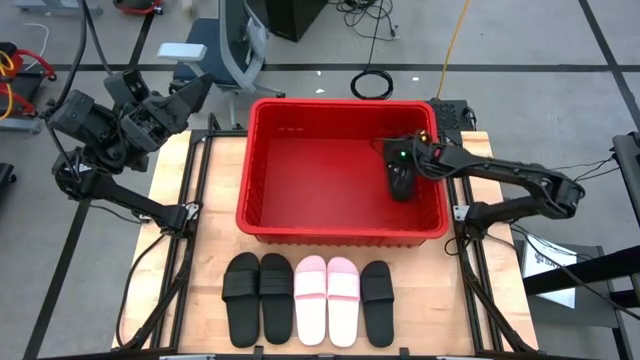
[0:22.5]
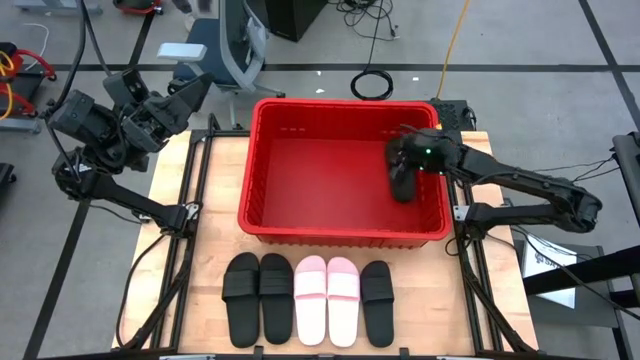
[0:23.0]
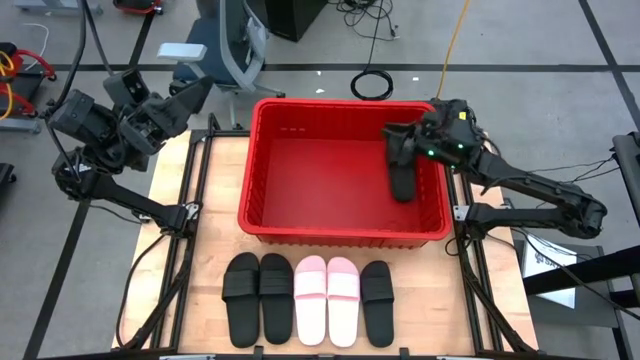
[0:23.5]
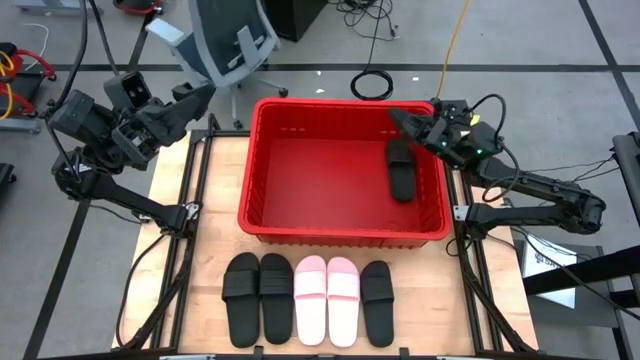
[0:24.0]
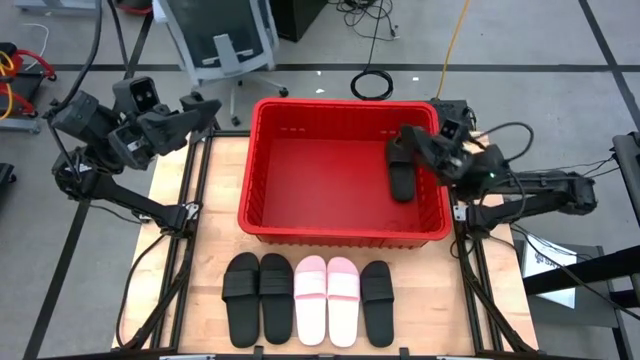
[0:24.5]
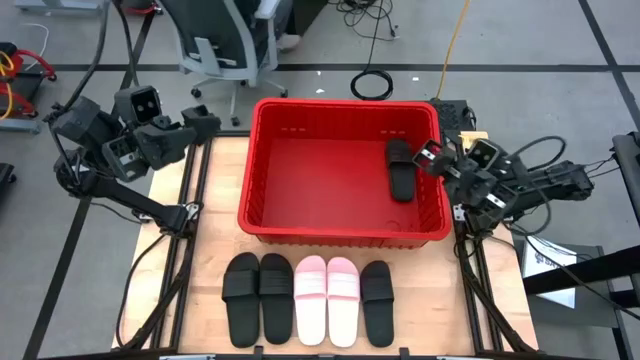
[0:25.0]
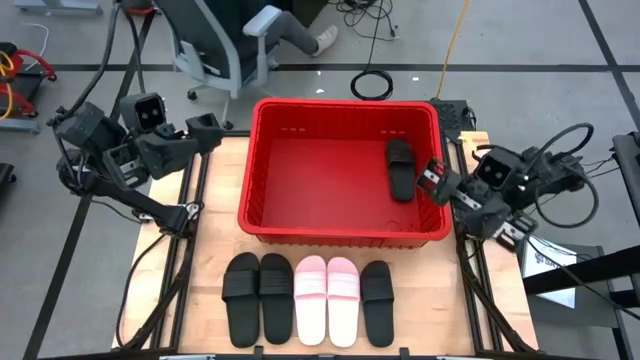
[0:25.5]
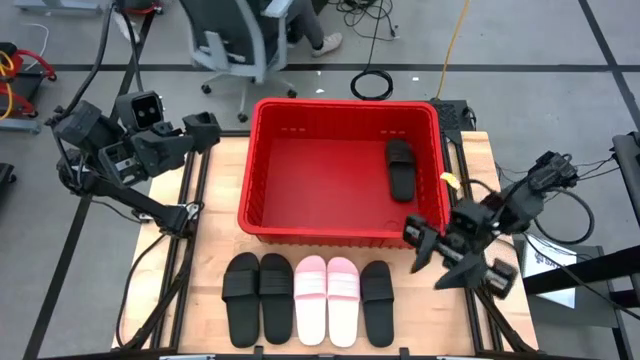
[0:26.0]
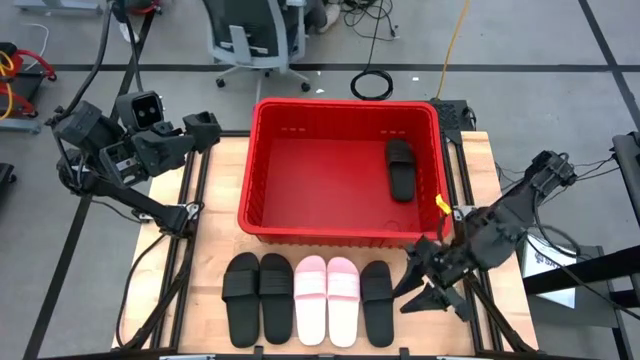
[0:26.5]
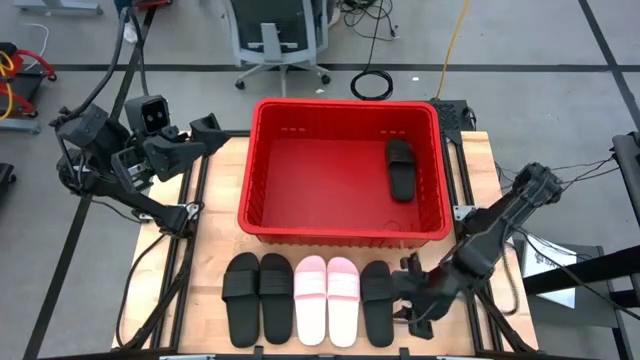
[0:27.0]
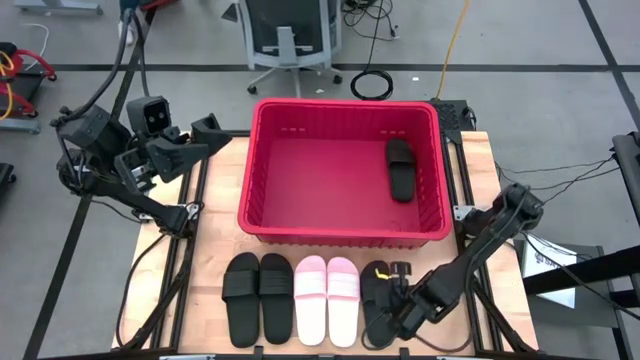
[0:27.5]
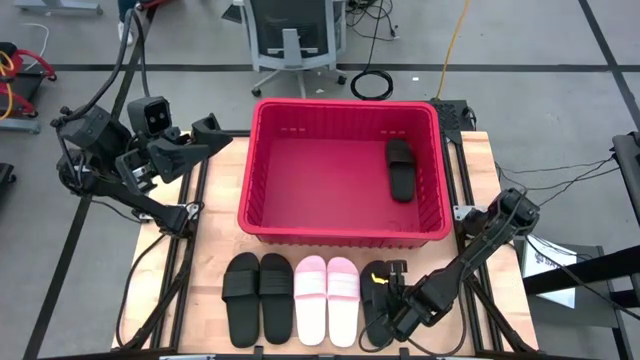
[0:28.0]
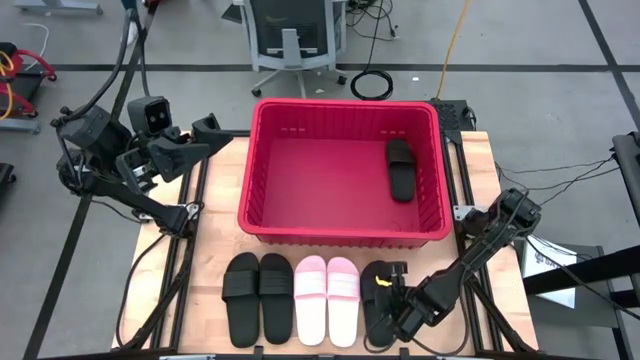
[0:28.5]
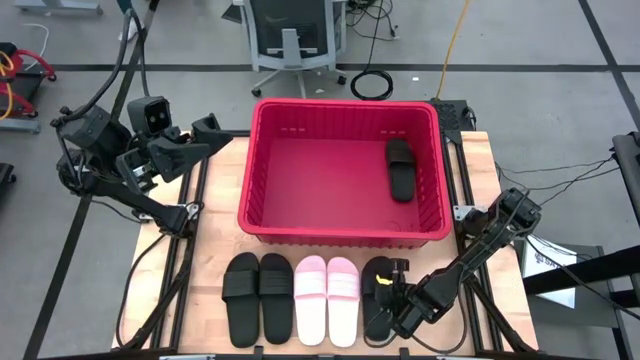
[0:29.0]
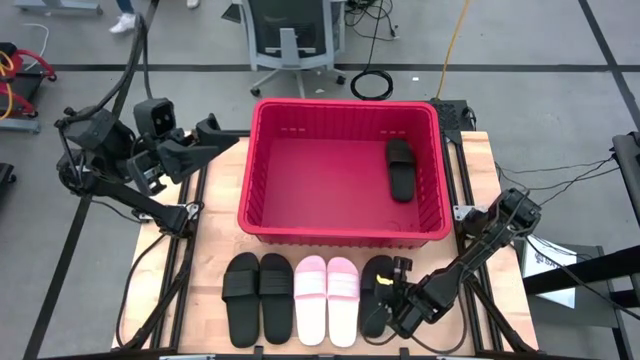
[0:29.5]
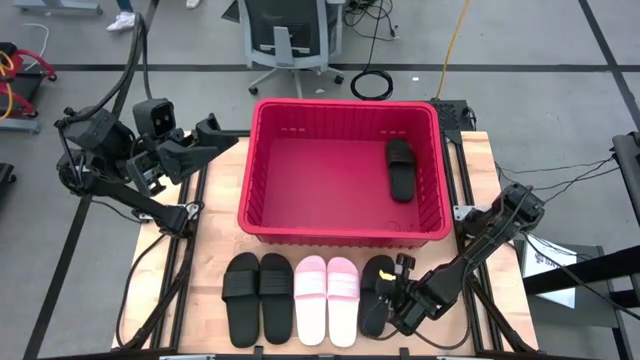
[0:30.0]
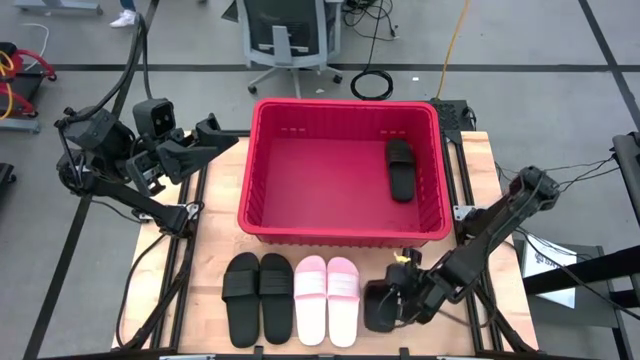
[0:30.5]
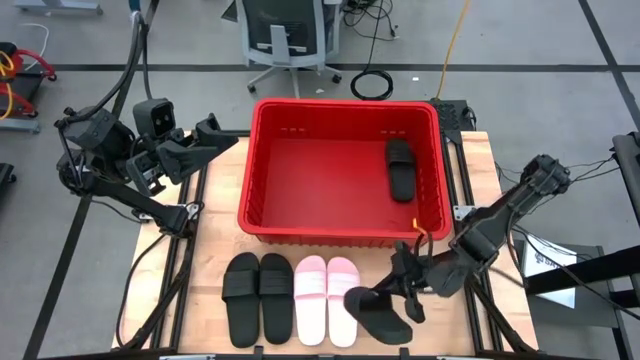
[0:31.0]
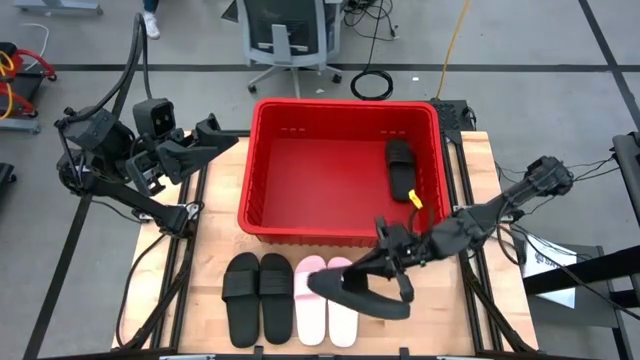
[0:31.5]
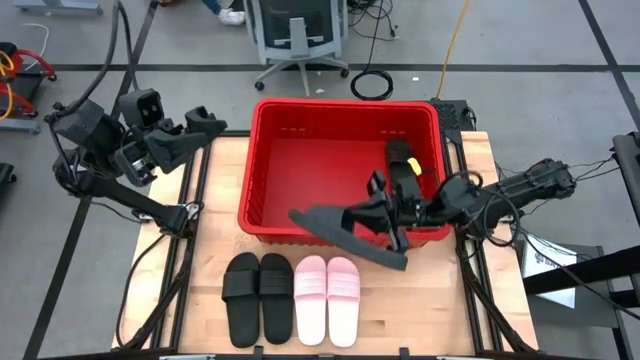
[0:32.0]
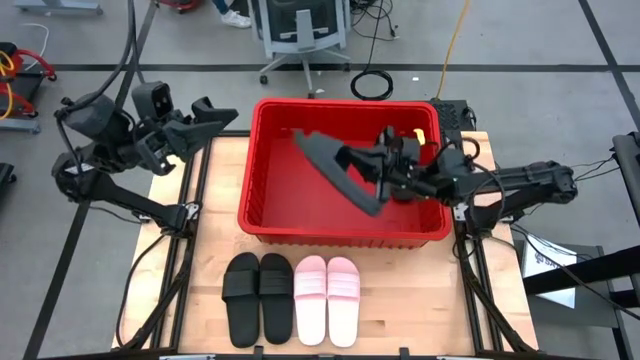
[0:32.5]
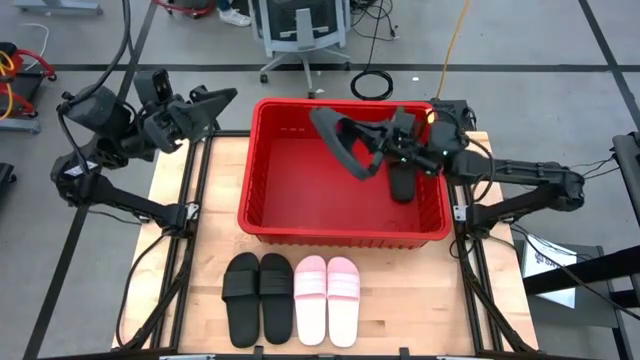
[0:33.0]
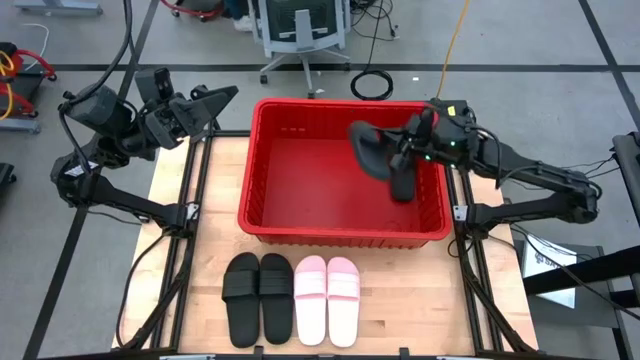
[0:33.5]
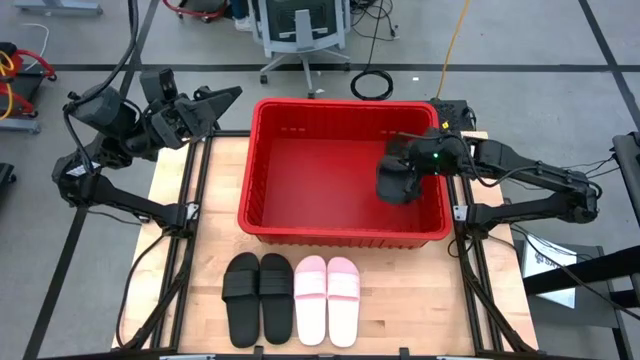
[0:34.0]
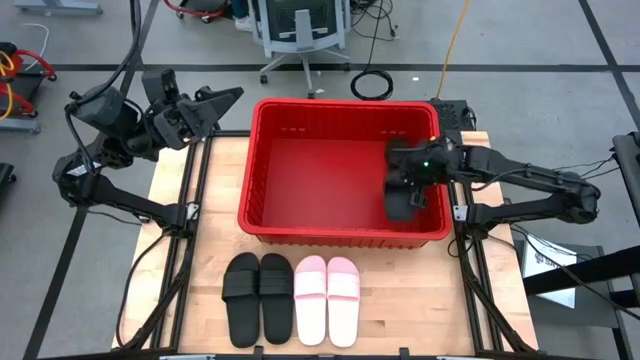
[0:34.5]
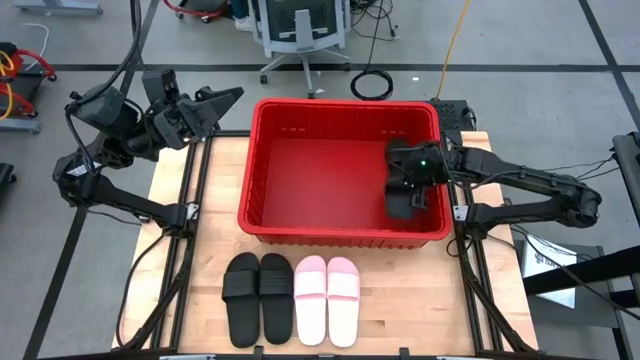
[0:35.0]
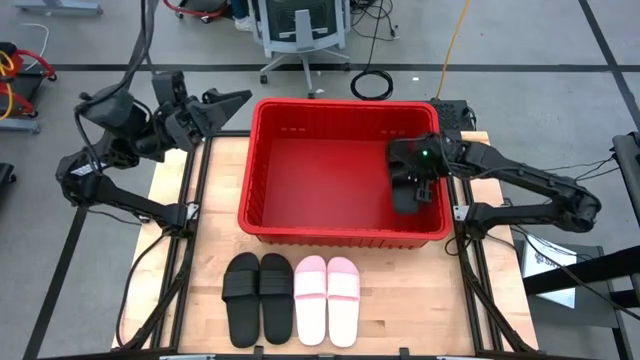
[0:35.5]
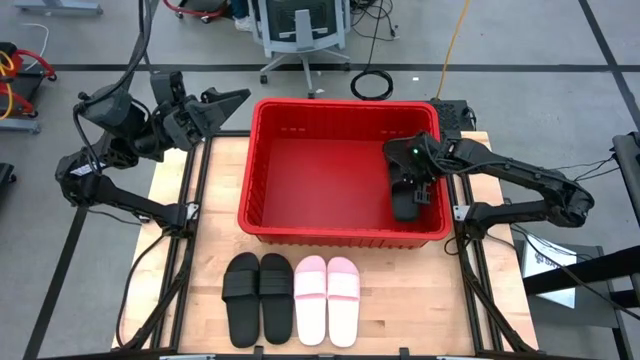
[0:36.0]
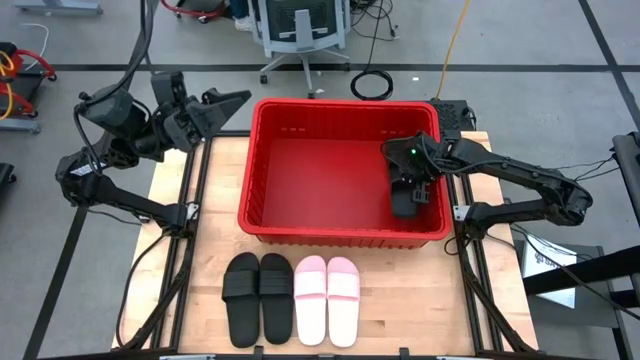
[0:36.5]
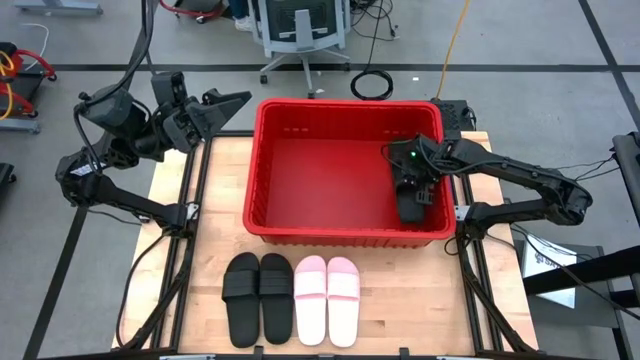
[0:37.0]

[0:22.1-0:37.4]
Task: Pick and place slides into bin
Put the black slide into the red bin

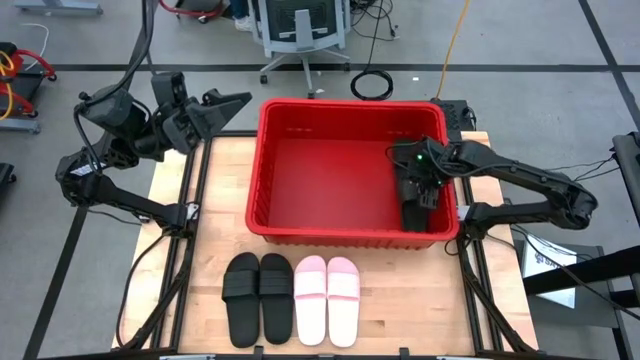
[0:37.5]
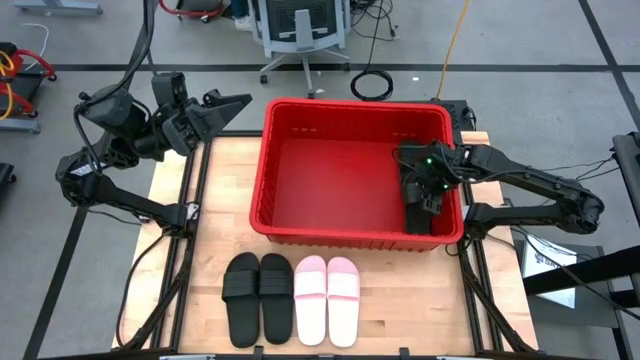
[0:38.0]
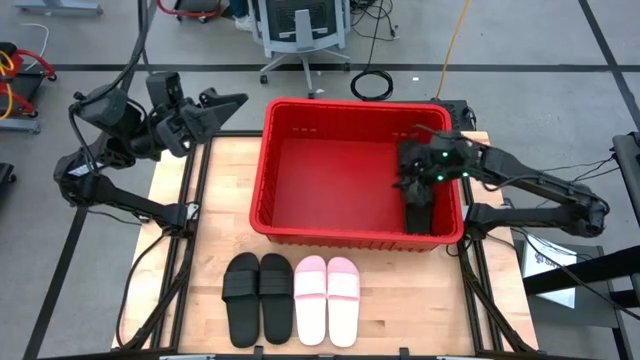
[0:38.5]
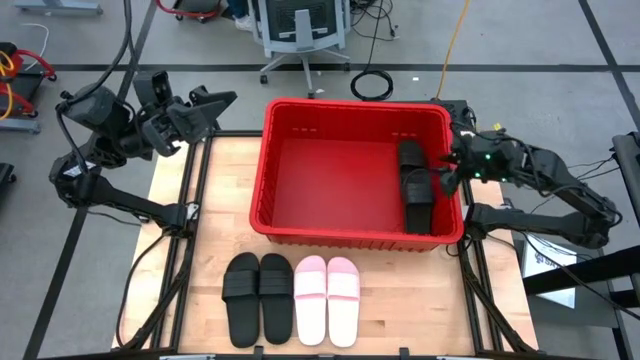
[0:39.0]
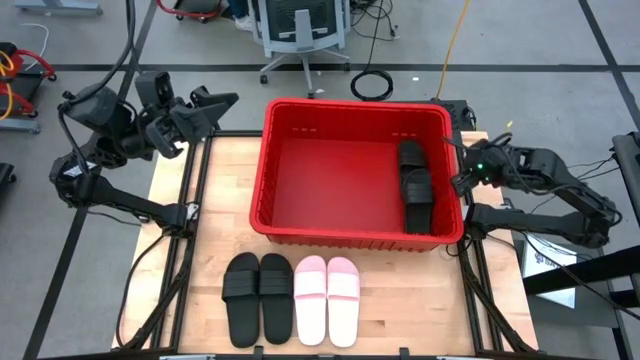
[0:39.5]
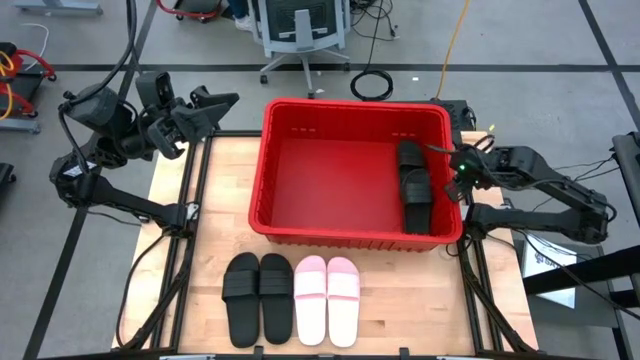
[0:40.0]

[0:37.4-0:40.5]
Adjust the red bin

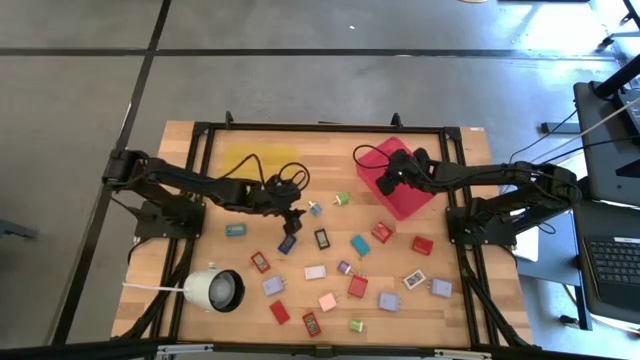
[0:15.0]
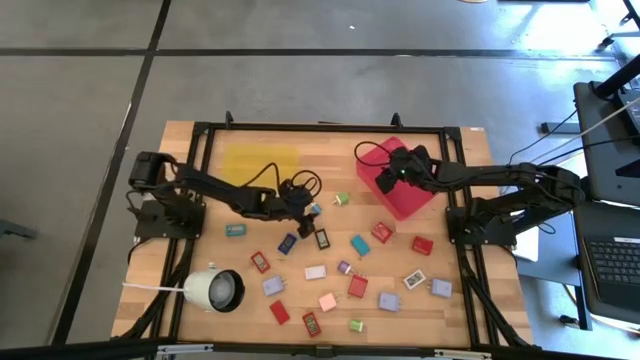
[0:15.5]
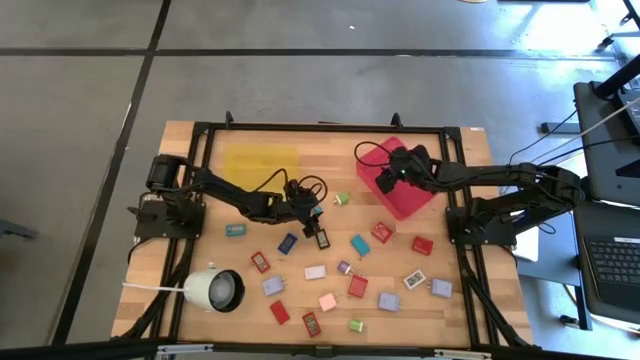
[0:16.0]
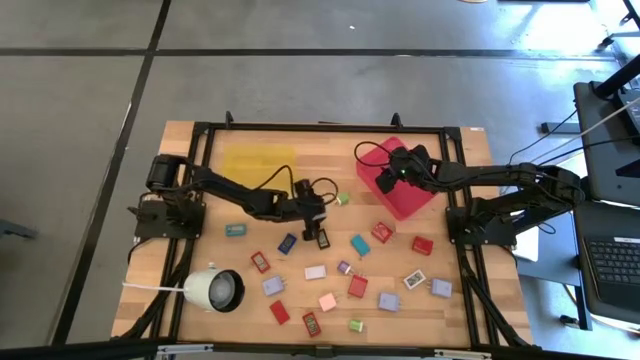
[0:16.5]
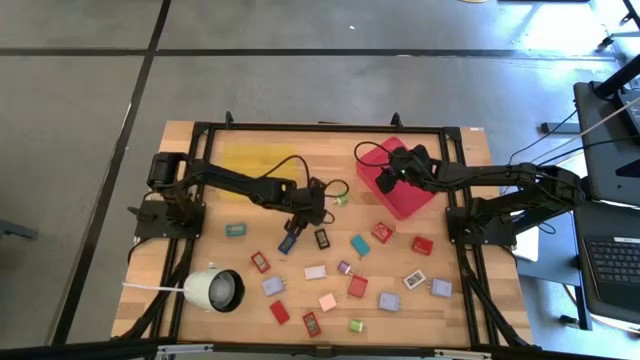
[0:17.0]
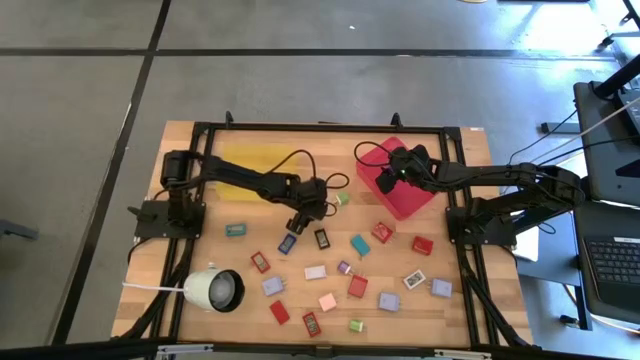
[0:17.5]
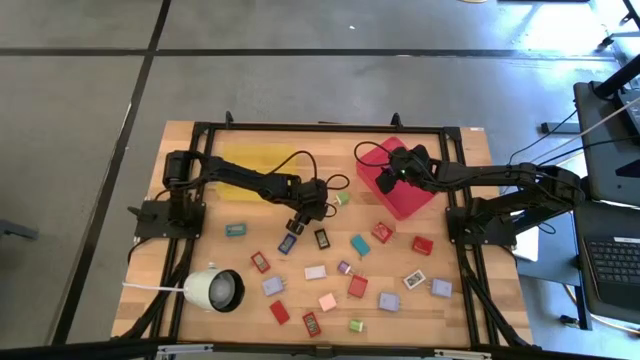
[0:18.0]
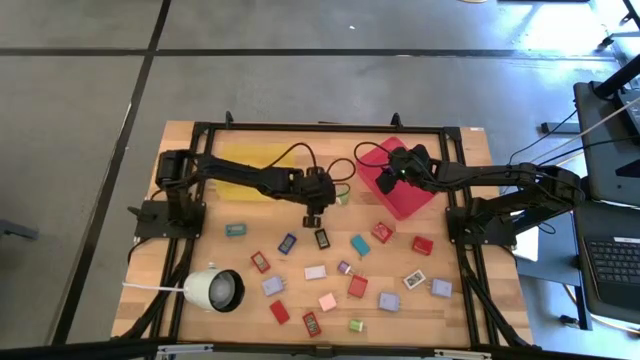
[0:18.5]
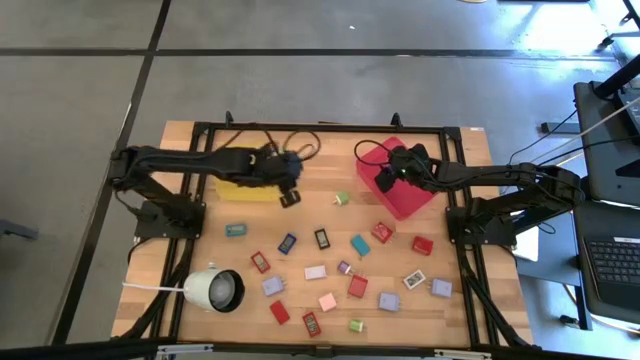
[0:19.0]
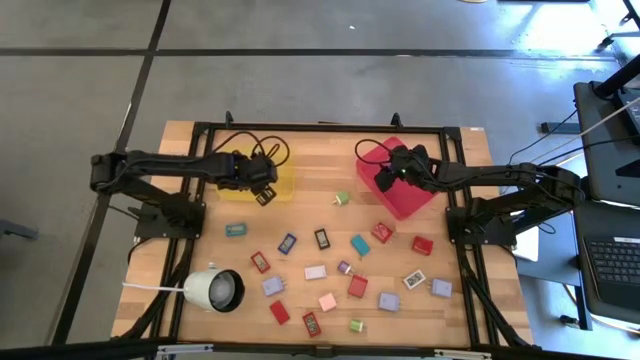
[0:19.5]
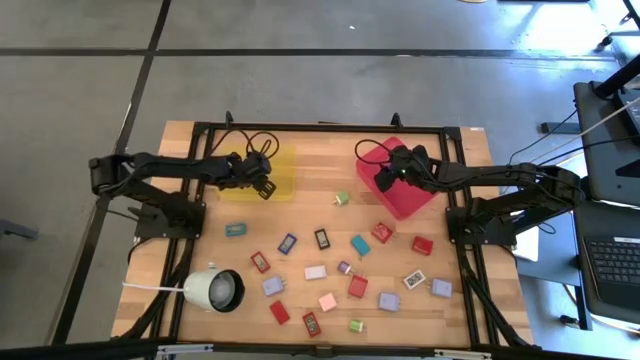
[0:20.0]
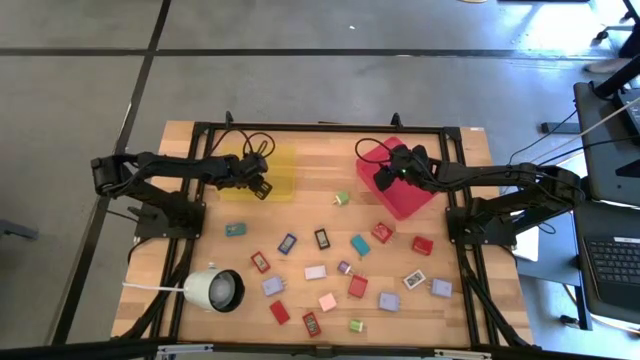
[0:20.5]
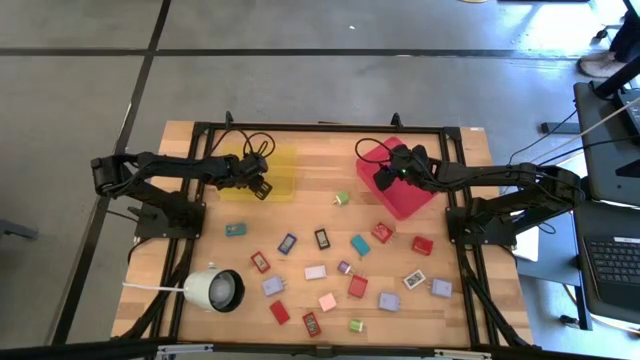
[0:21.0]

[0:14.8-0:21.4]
Task: Pick & Place Office items
Put the light blue charger adapter into the yellow bin
